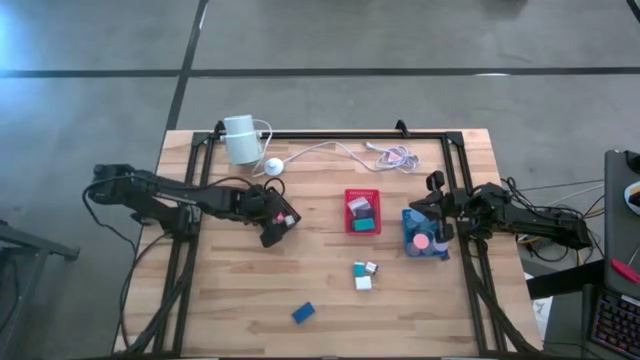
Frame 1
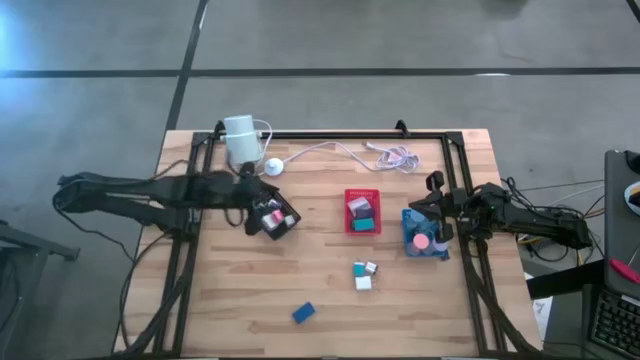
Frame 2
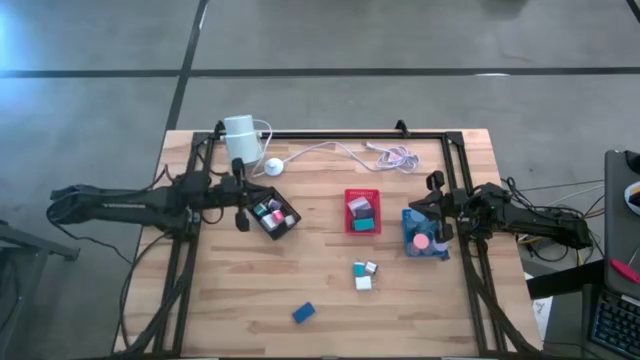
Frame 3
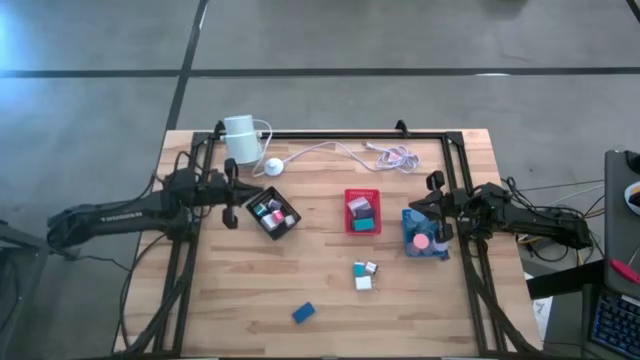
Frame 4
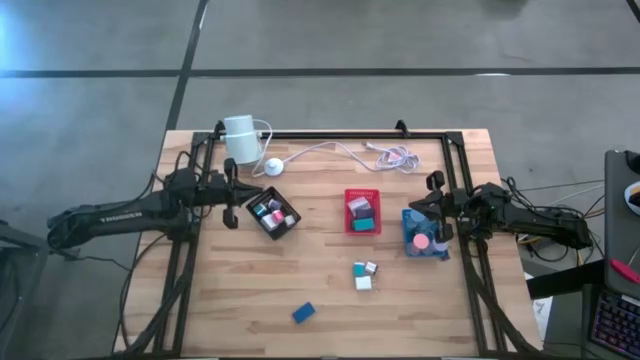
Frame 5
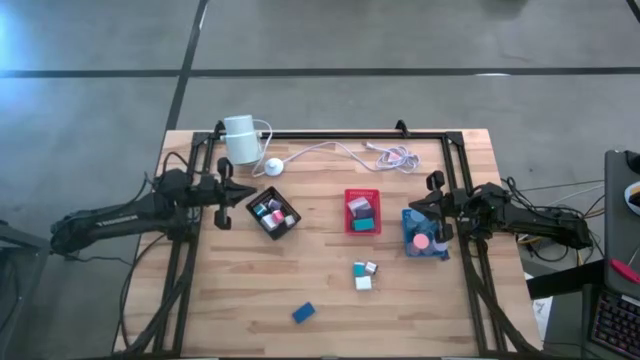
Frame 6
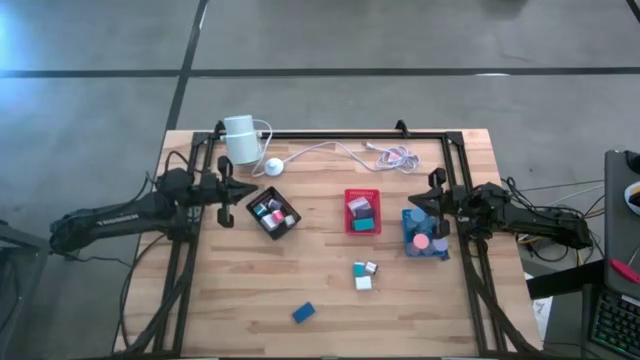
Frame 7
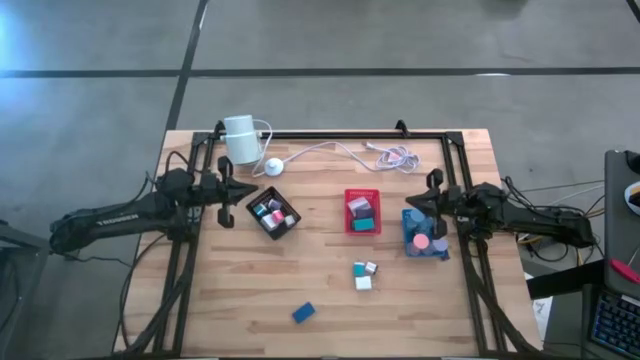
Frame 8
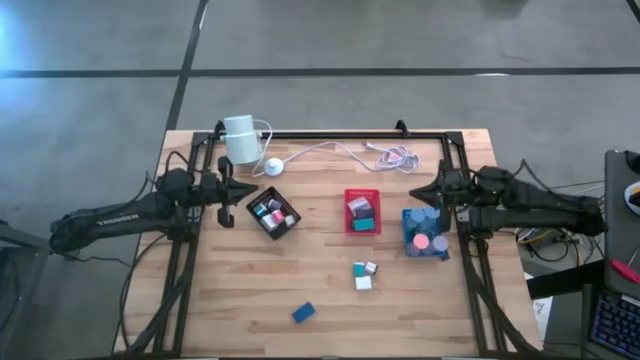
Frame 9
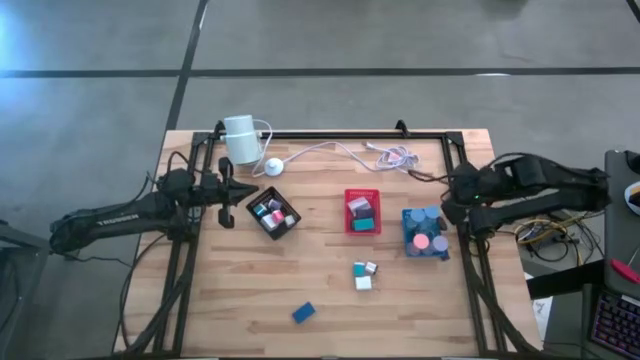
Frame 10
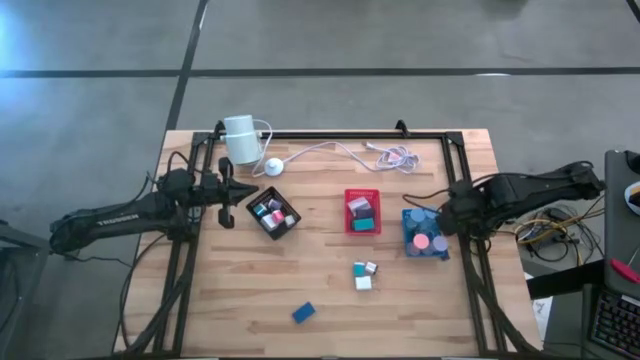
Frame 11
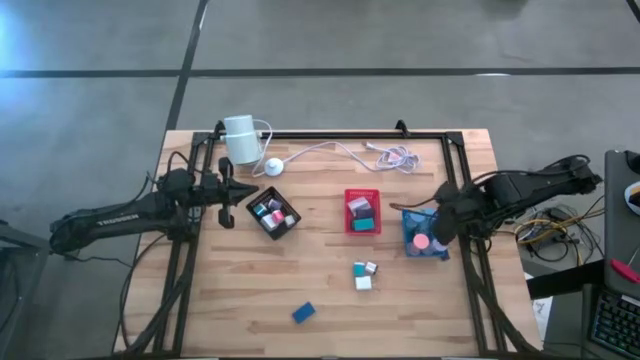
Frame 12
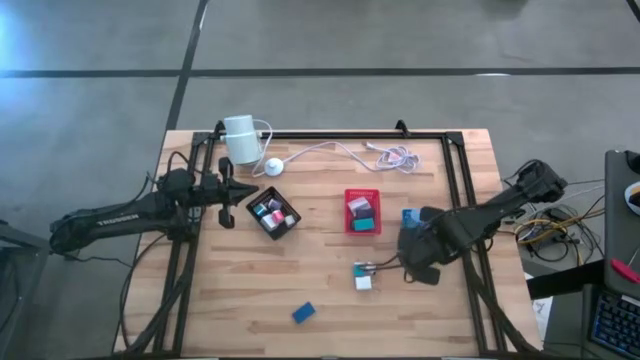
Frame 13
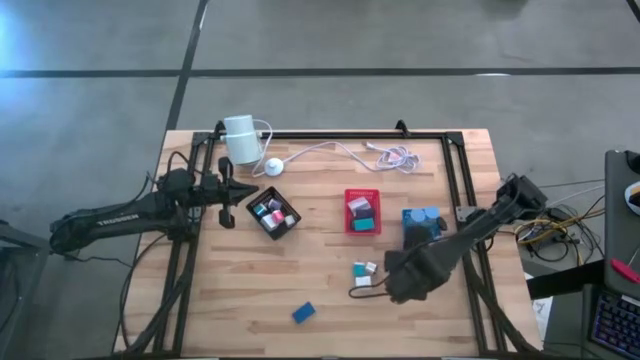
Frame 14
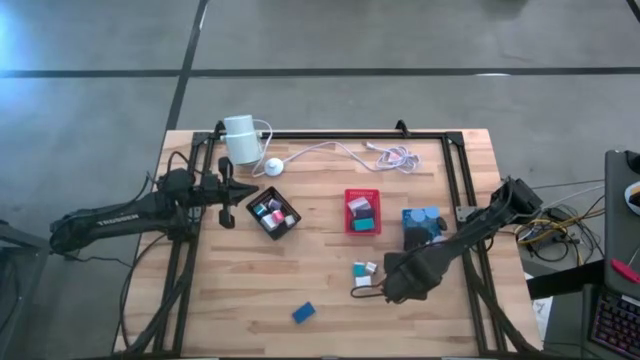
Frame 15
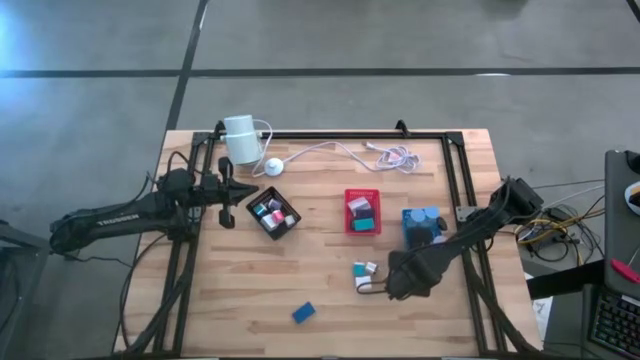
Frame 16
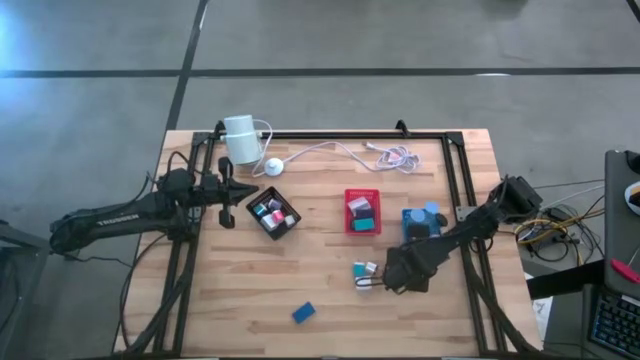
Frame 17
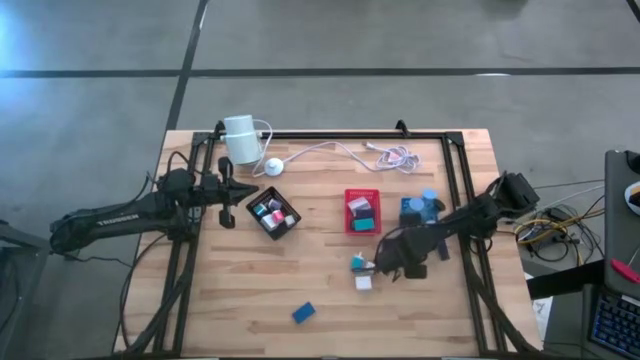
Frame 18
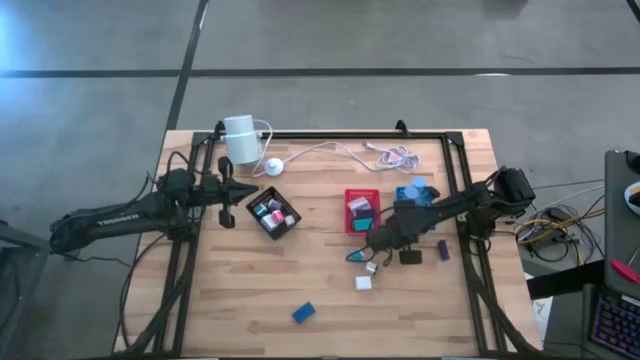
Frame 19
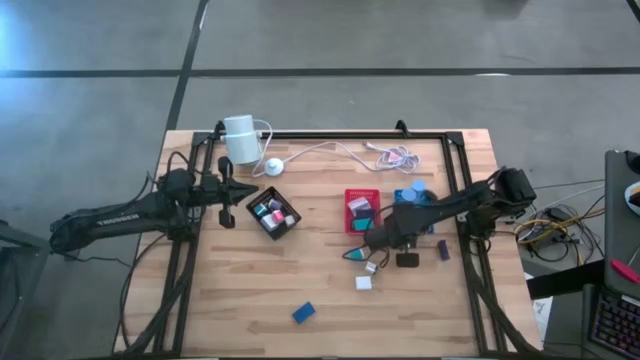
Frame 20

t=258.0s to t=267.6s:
Task: Pick & Place Office items
Adjust the blue bin

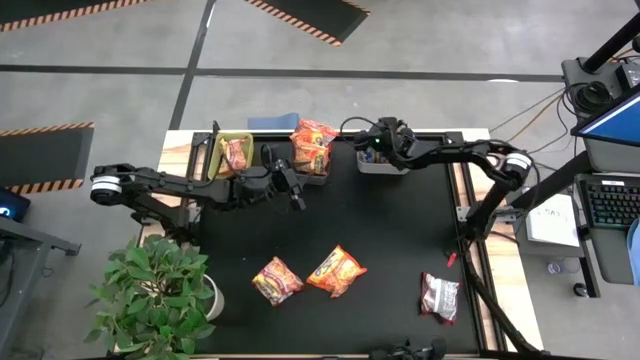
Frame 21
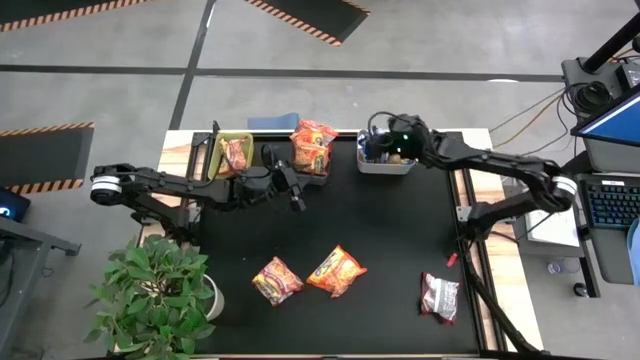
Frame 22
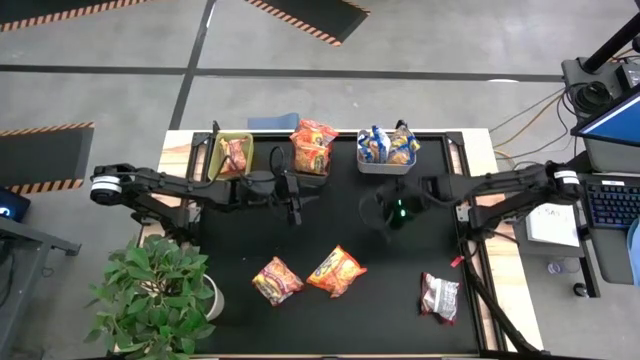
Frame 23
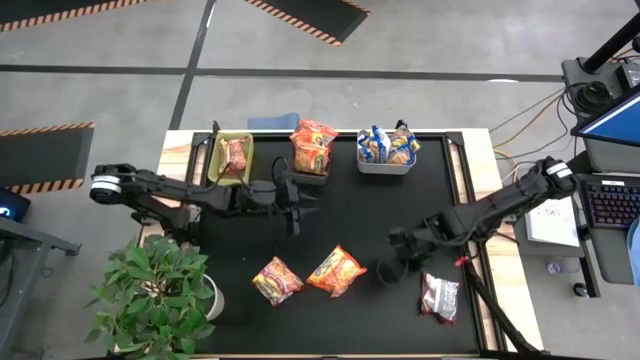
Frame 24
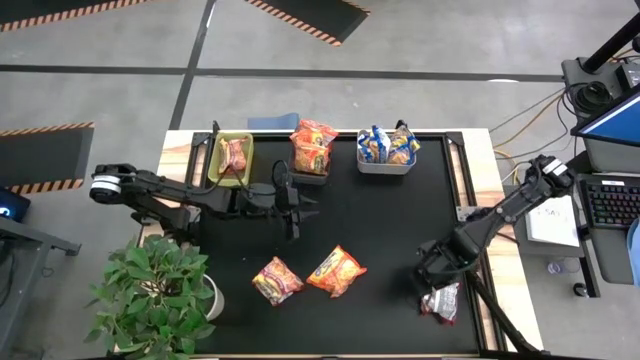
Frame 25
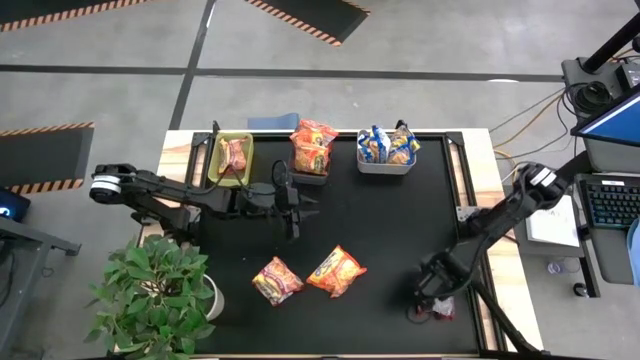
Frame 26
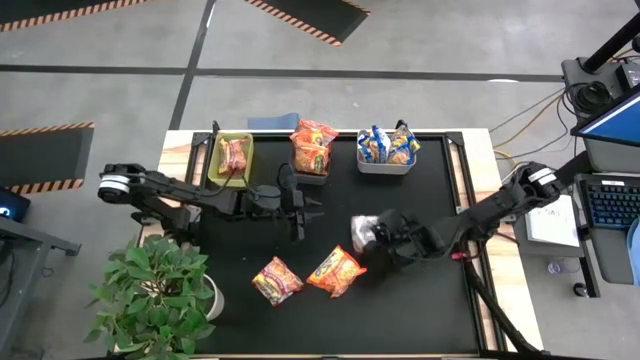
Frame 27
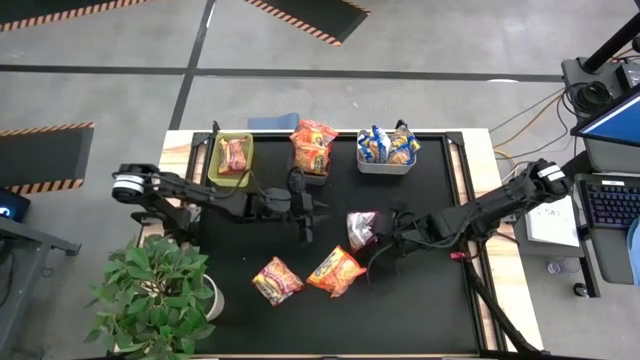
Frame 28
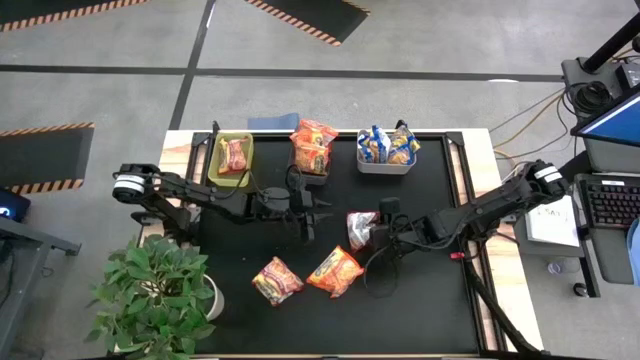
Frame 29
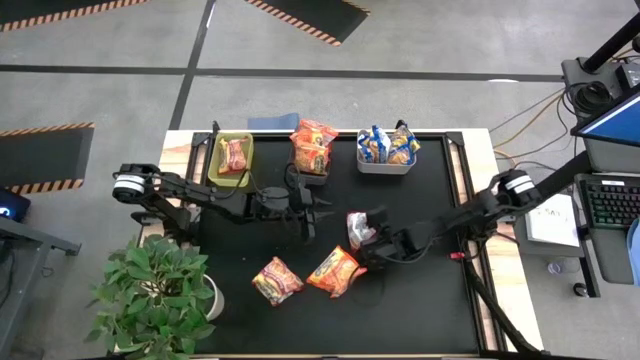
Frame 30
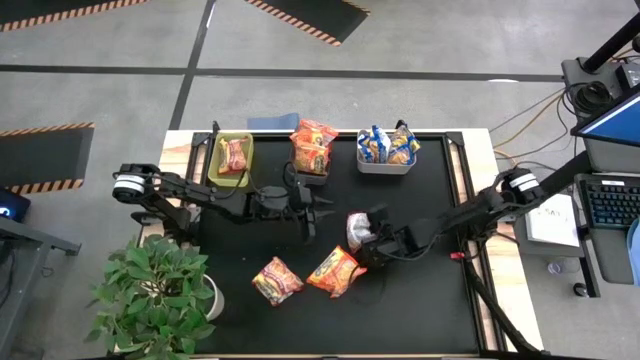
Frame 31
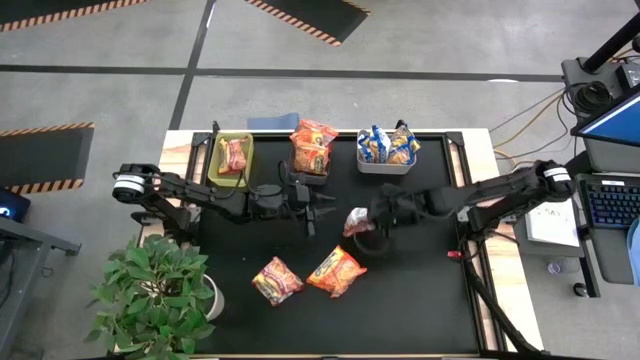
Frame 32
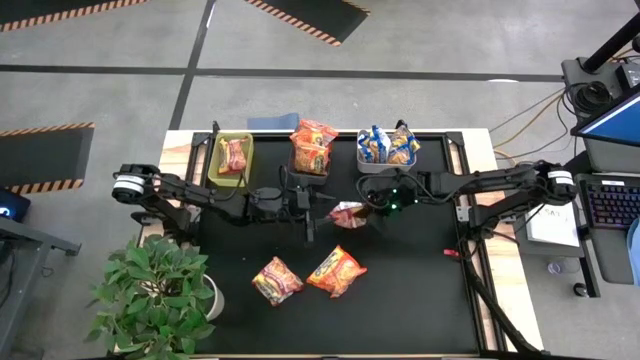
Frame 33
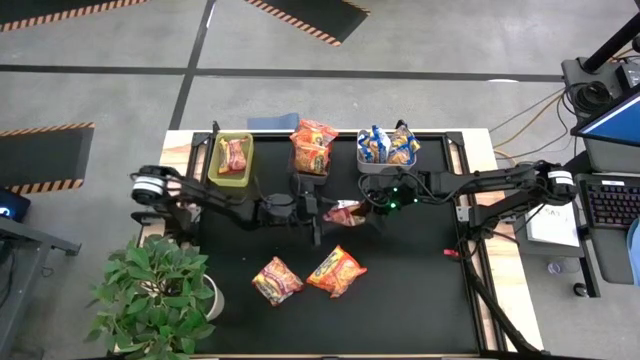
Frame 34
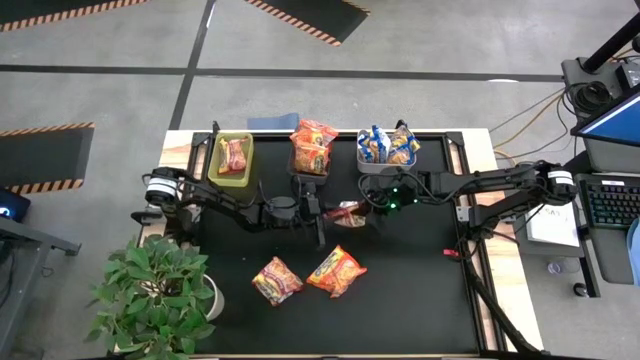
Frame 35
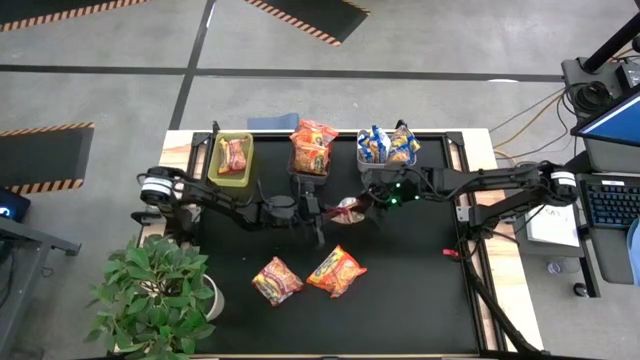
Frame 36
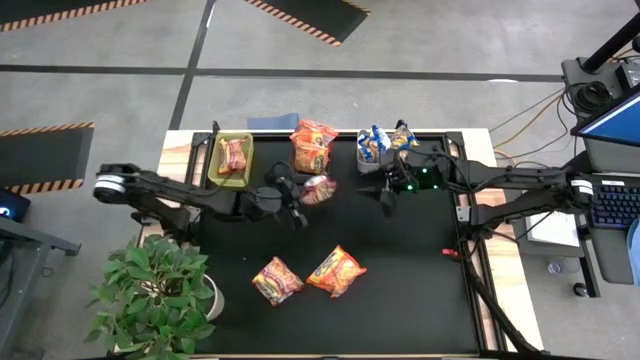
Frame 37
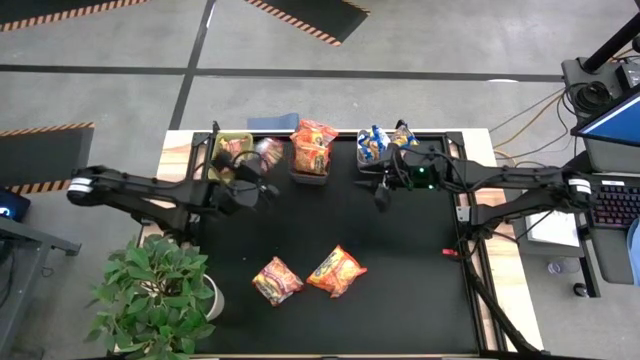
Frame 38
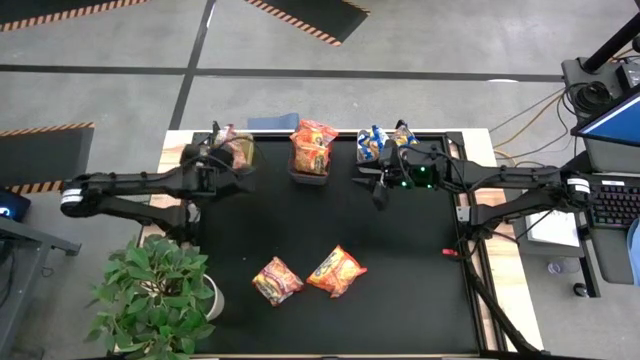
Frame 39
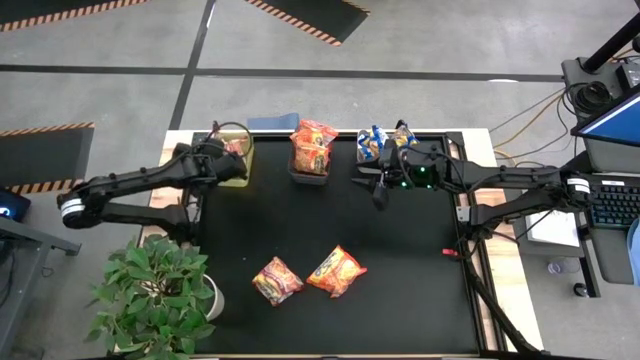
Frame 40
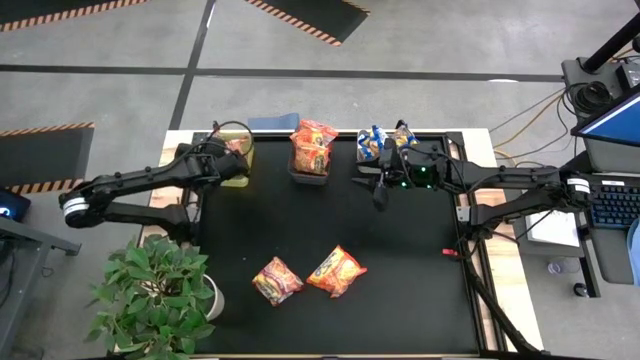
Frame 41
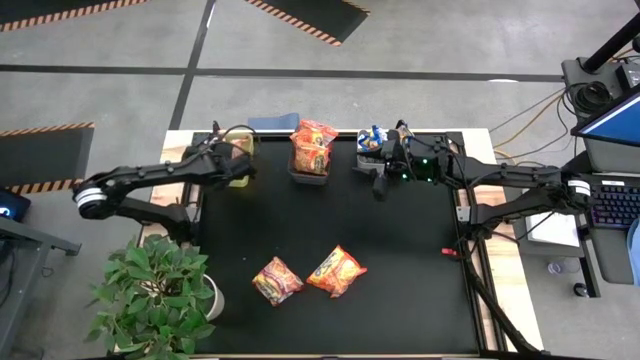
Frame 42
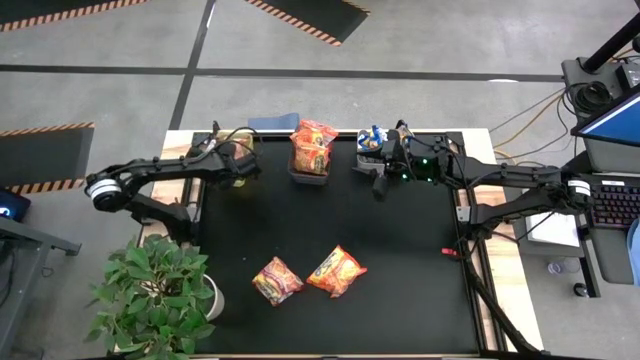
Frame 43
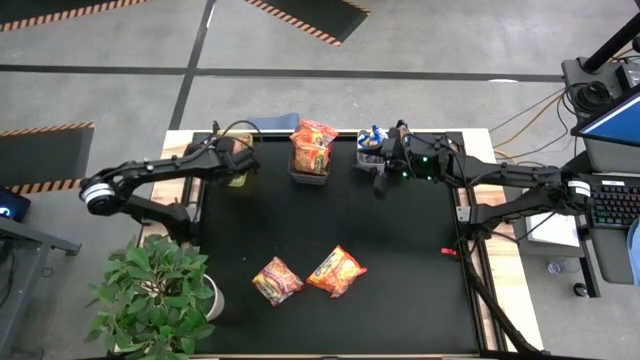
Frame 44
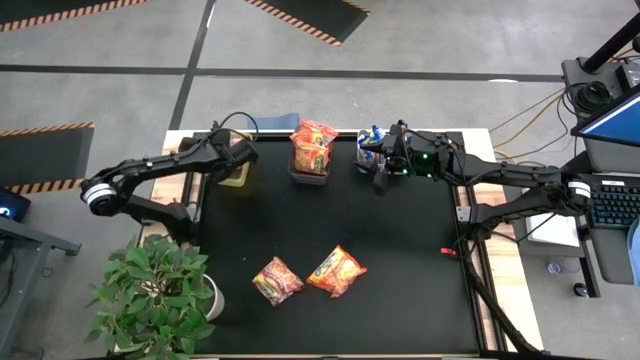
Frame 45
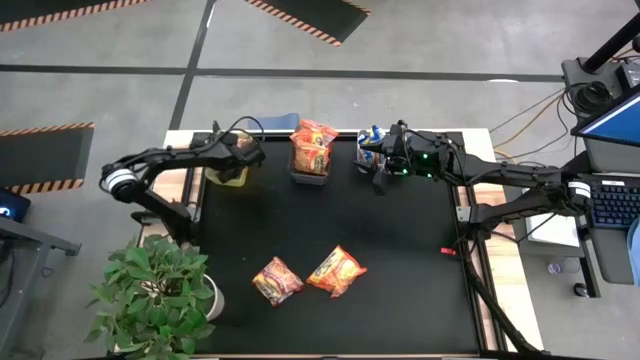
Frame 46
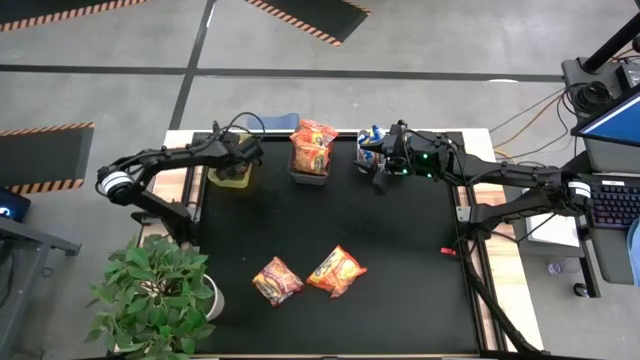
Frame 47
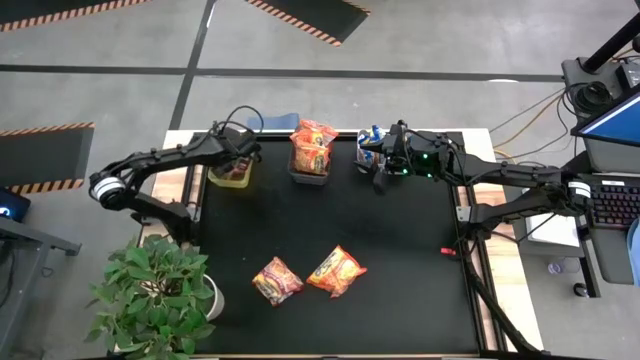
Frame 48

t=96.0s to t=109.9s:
Task: Sort Maruchan noodles
Put the red noodle pack into the white bin
